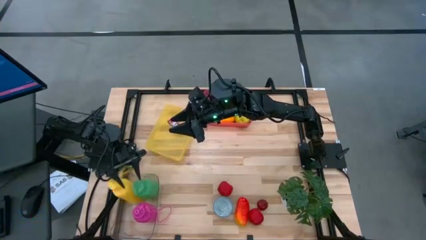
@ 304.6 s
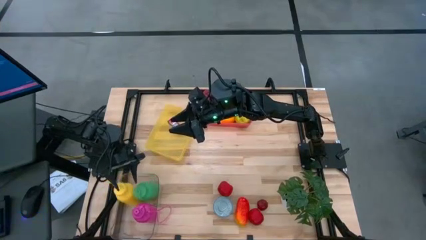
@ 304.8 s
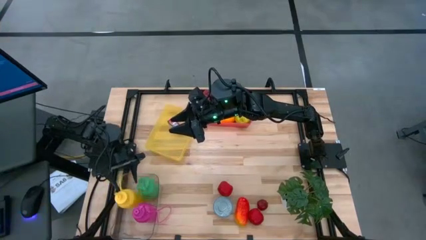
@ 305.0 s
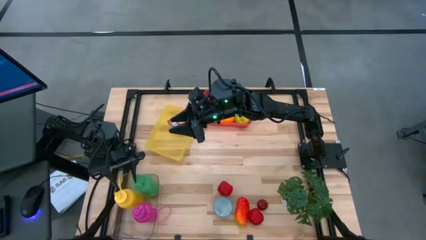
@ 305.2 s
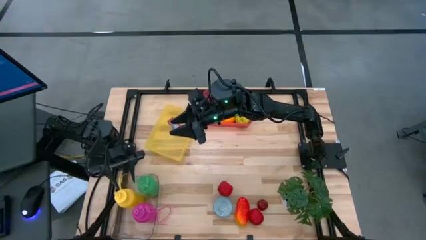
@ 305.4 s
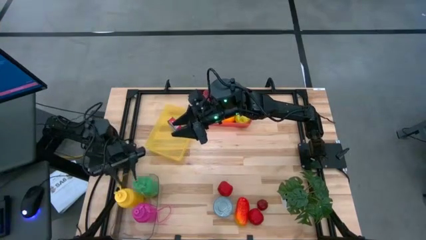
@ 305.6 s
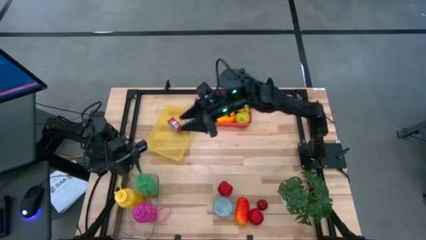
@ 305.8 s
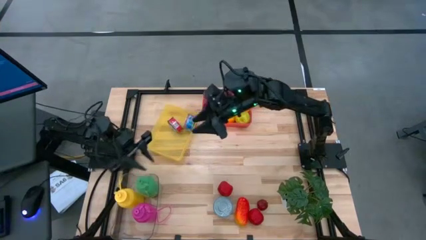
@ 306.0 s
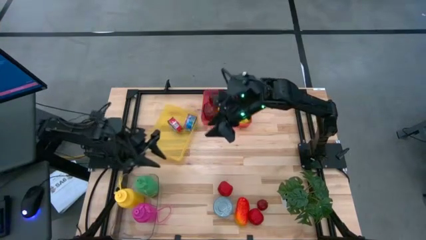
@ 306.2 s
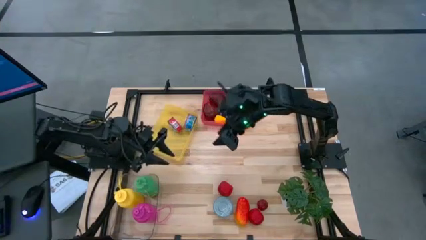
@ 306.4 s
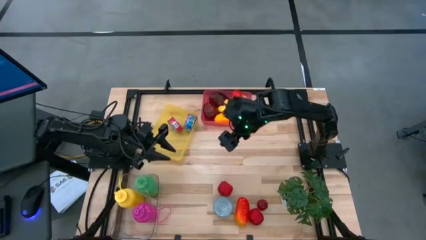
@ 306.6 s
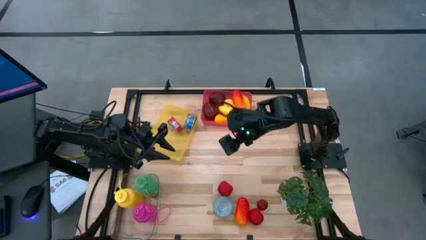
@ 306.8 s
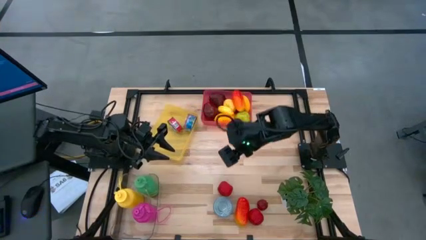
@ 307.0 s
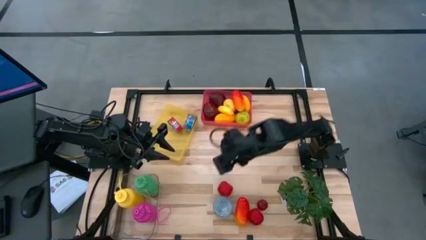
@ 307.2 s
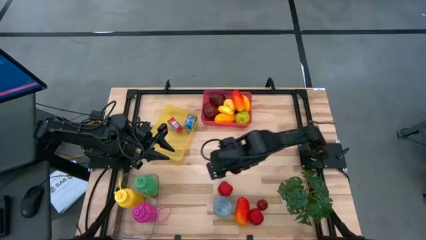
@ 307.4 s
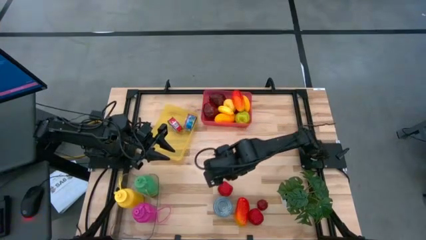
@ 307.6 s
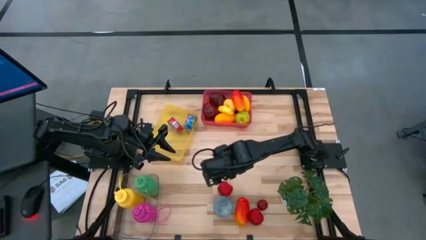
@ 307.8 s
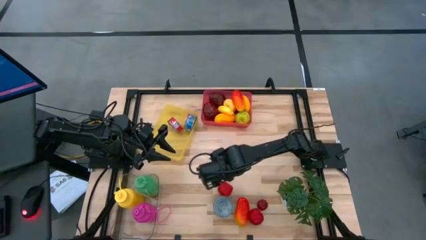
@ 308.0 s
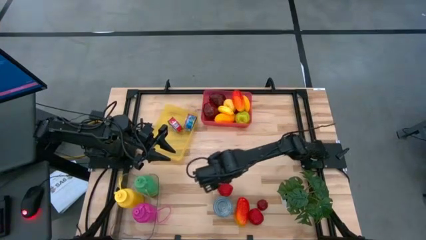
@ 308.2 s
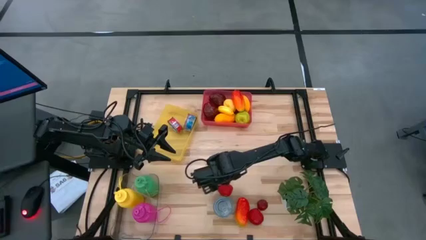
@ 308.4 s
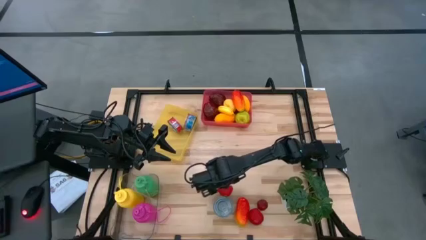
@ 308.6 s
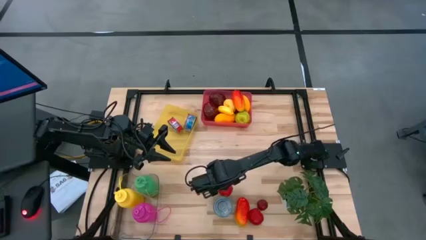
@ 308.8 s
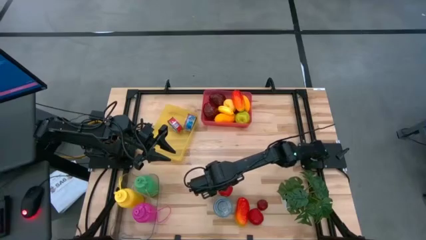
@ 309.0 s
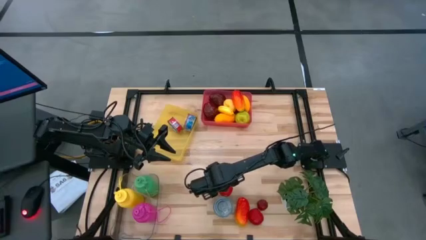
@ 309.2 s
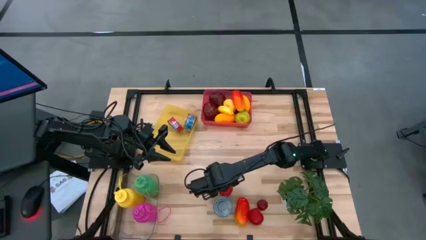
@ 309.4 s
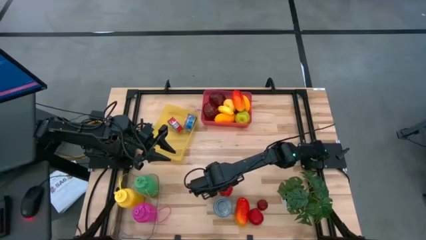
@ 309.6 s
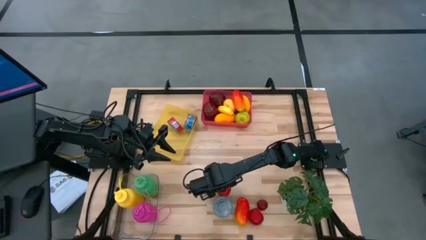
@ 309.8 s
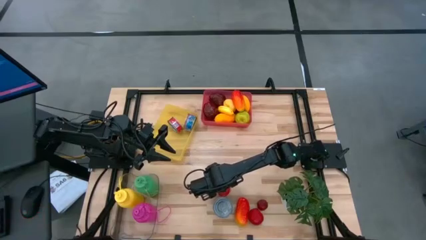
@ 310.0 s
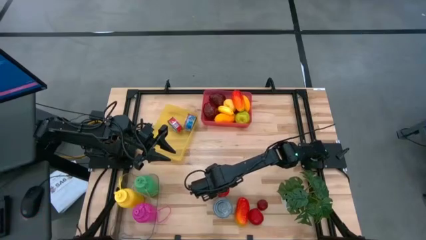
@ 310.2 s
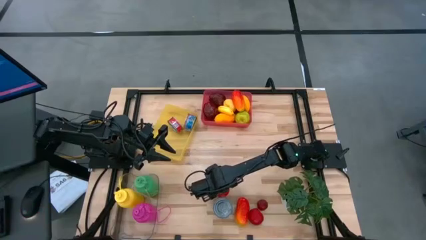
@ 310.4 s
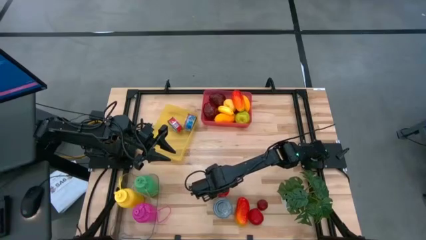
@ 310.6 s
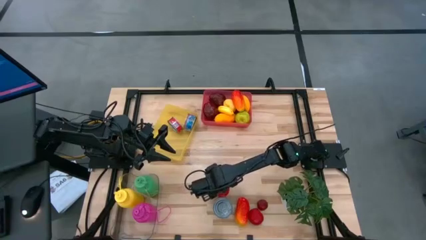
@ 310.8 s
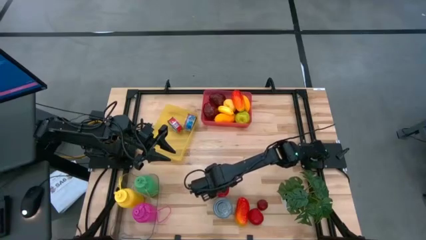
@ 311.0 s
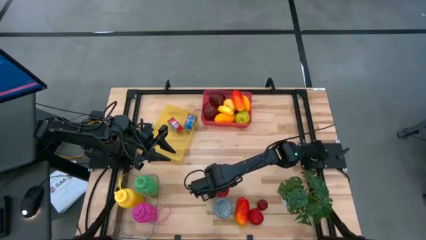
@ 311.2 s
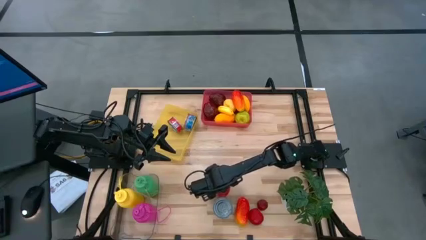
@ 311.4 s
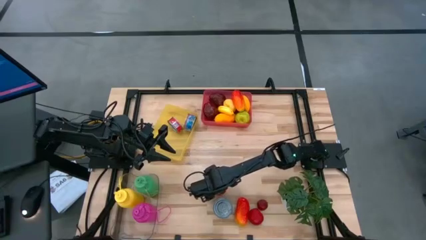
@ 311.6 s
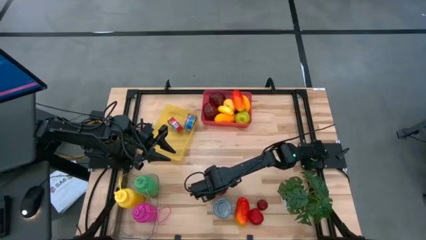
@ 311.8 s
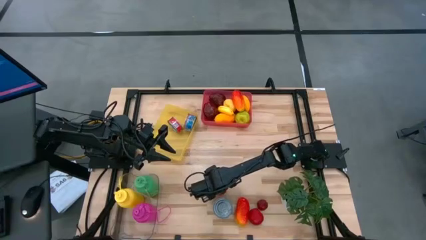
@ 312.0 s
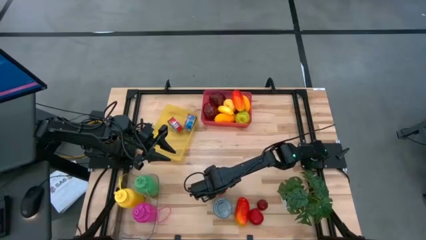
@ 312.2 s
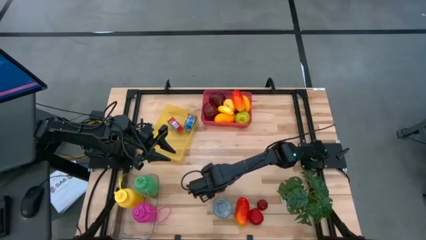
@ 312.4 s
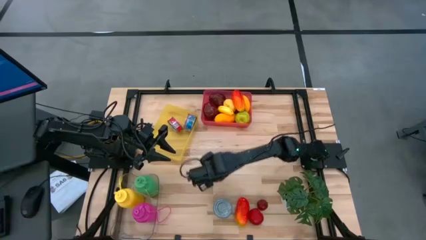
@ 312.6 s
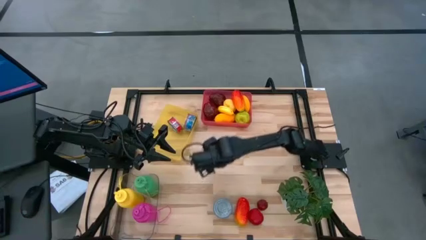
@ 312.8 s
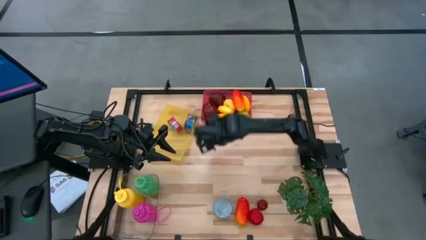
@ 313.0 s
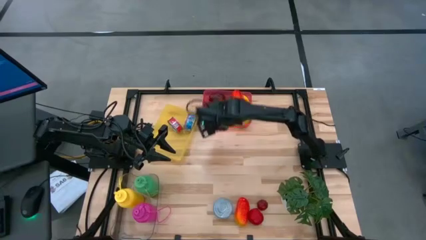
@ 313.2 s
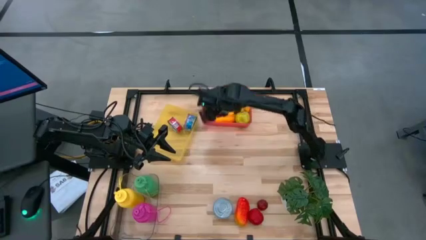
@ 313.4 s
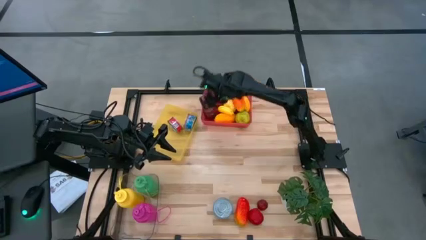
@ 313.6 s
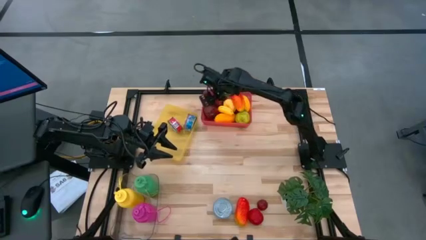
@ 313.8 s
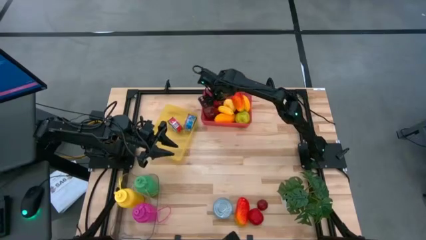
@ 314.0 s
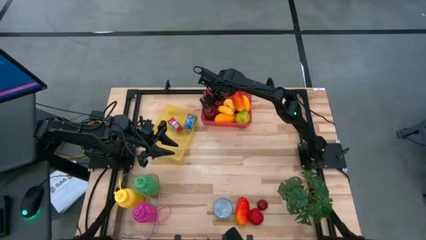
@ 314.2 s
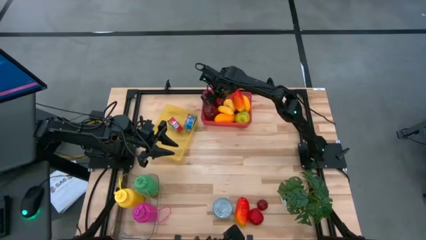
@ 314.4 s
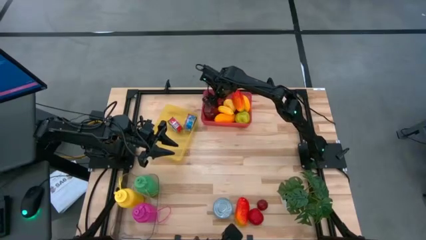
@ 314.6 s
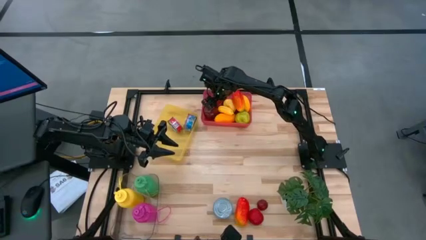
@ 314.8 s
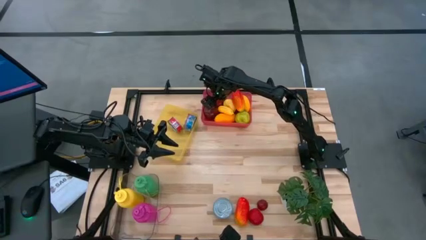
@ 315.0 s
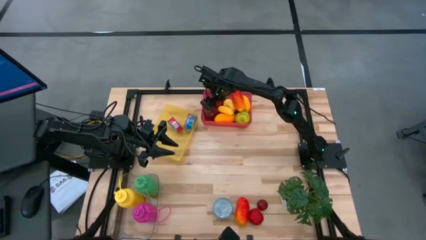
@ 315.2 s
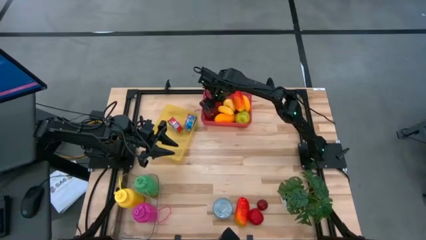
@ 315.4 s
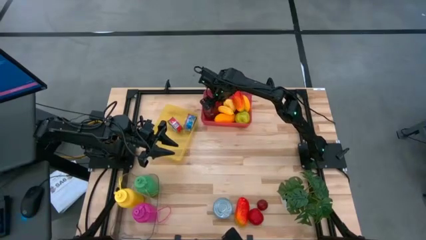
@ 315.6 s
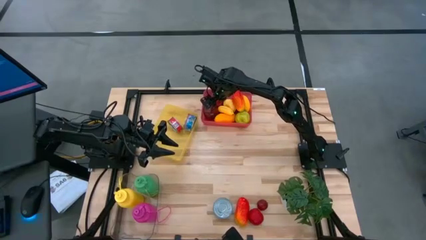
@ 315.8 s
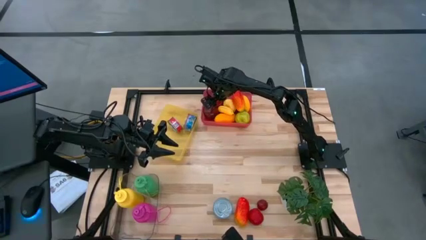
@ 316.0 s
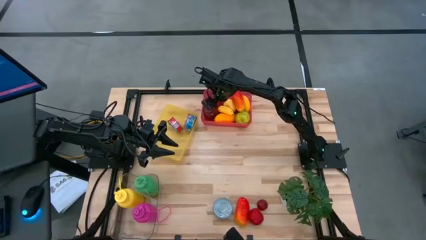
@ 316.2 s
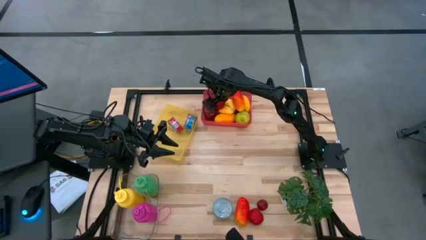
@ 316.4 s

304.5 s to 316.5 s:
Task: Pick & Place Food Item
Put the left tomato into the pink bin
